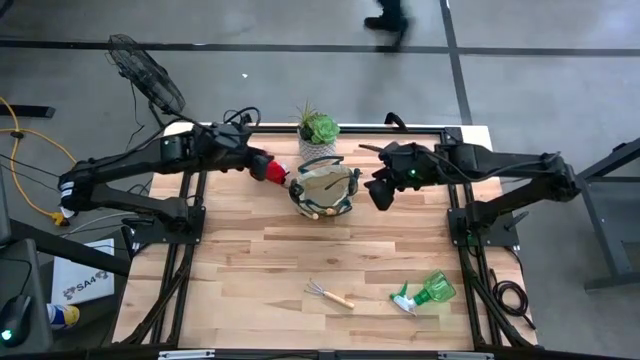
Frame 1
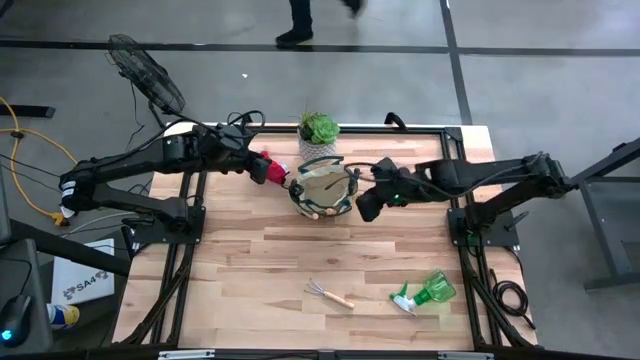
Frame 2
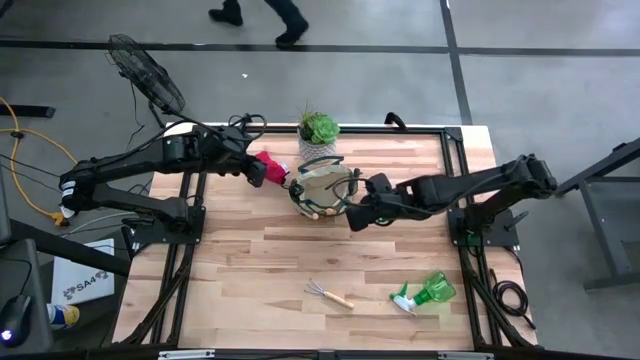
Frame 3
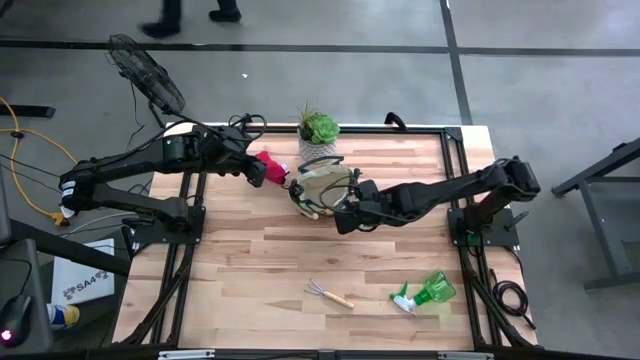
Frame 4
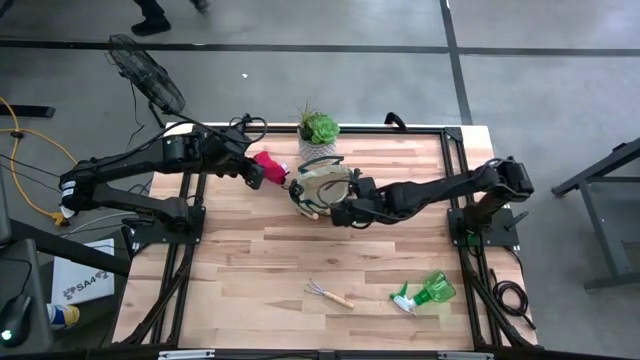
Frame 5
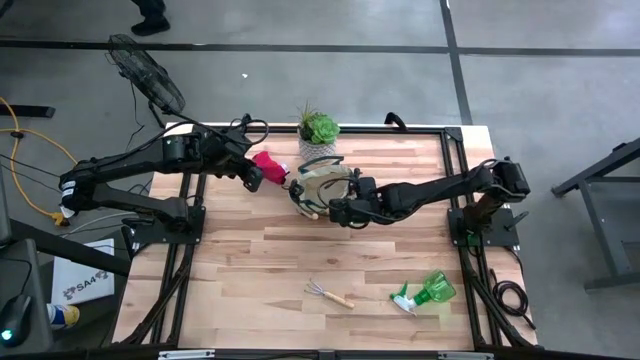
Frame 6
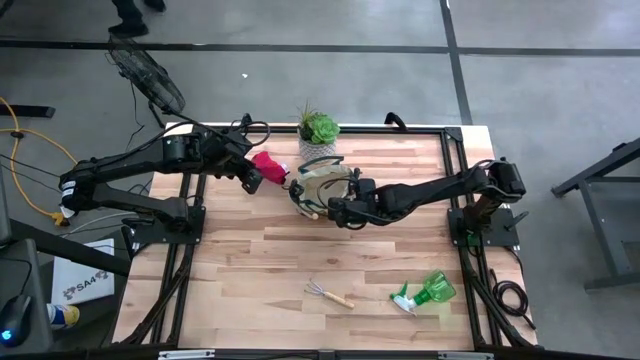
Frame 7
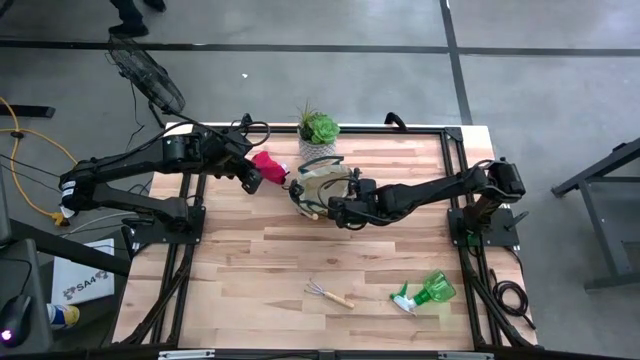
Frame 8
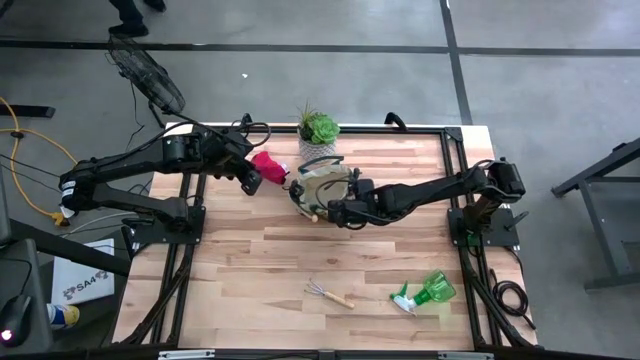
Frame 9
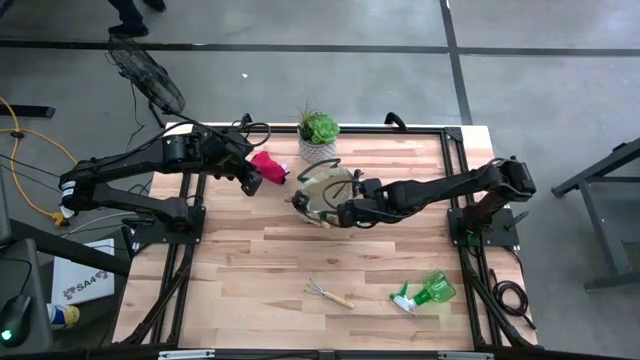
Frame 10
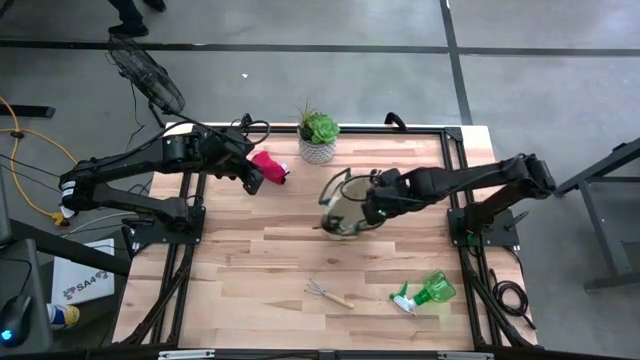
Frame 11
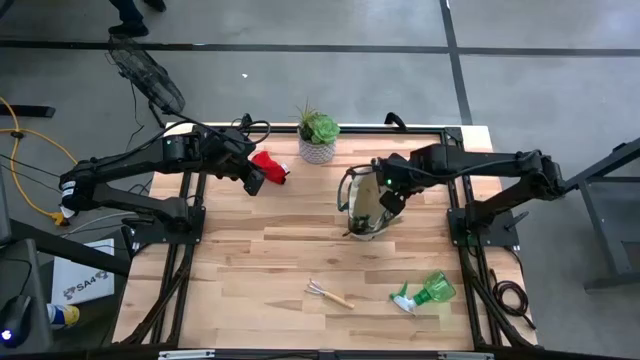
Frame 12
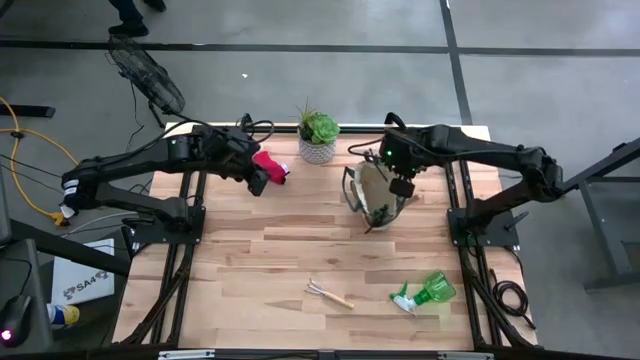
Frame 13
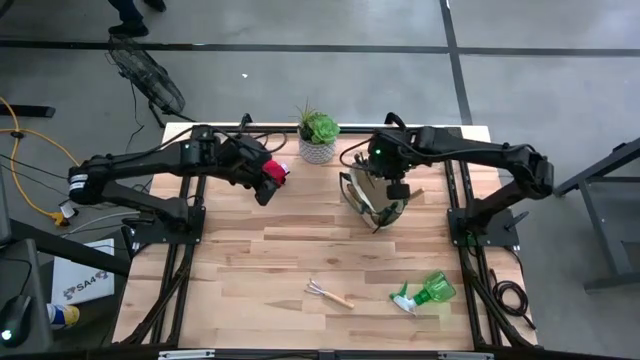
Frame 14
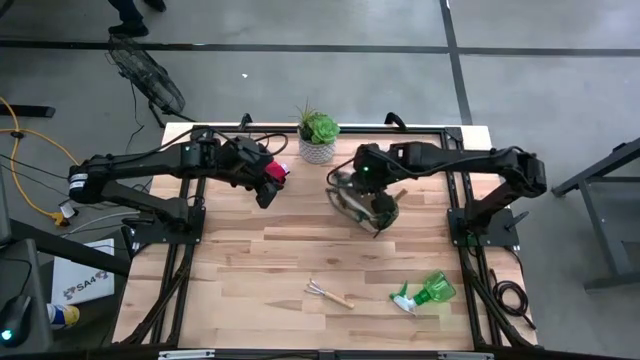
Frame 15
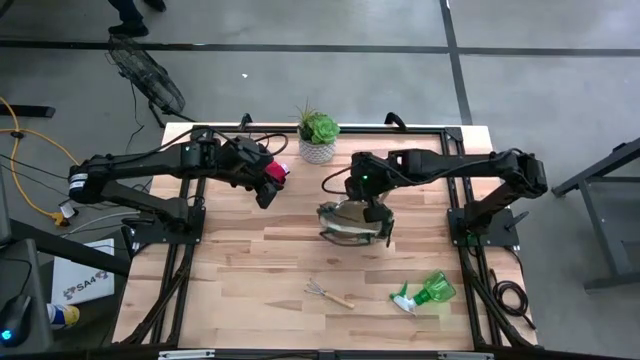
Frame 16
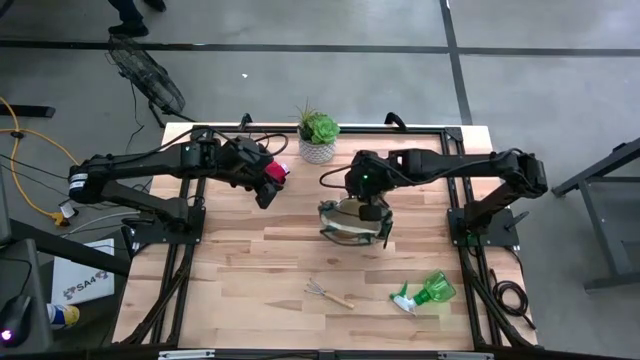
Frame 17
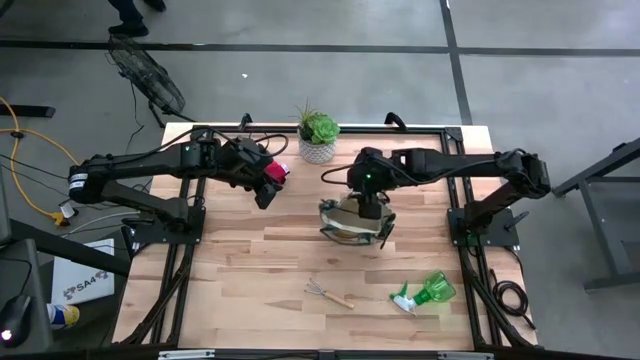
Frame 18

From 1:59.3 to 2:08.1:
Task: Pick & Place Garden tools in Gardening bag
Adjust the gardening bag

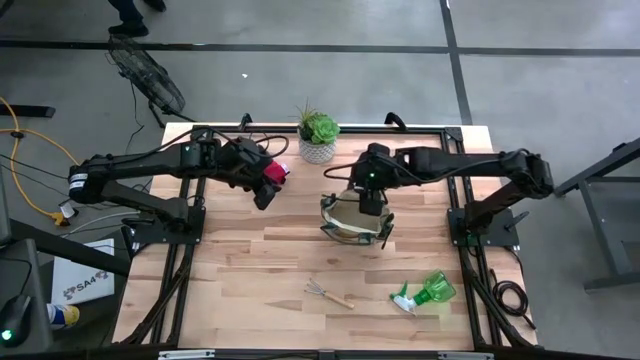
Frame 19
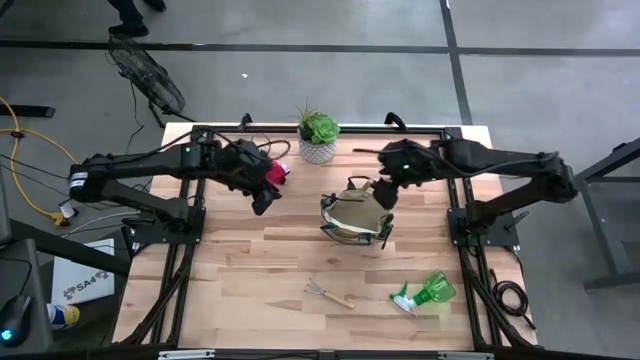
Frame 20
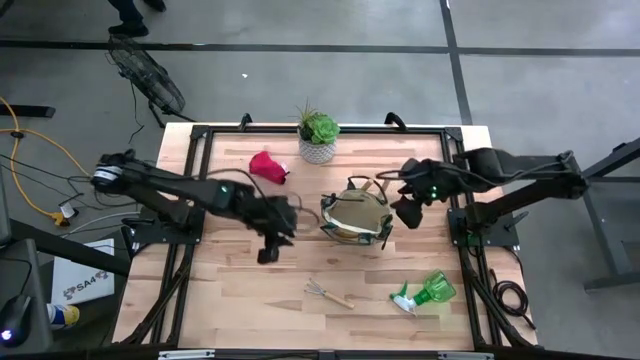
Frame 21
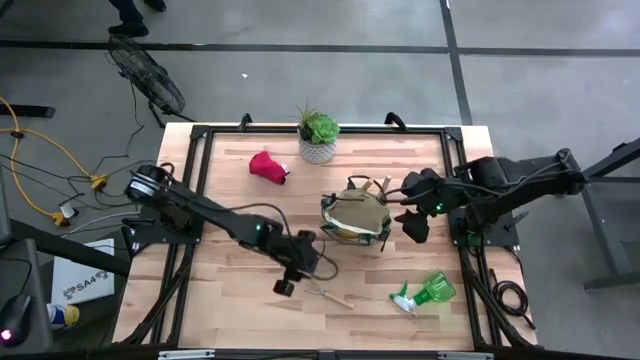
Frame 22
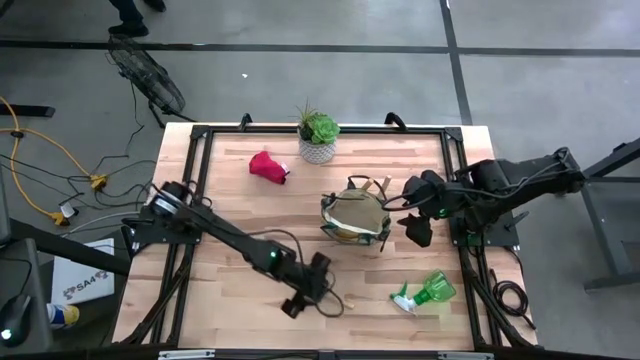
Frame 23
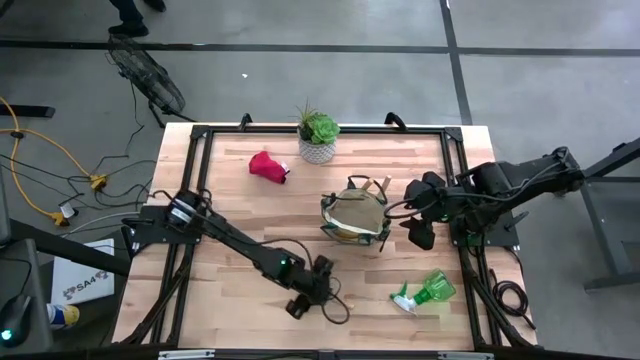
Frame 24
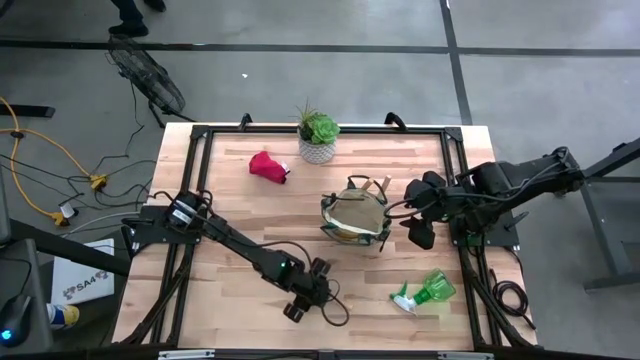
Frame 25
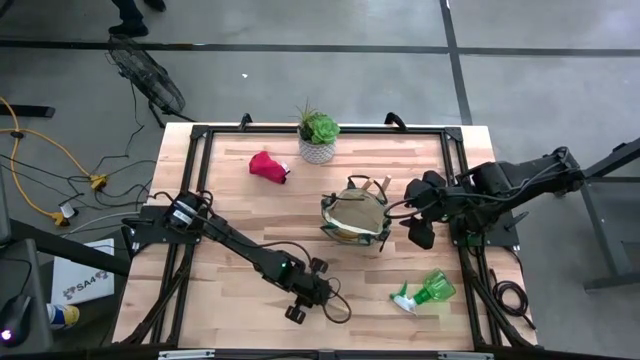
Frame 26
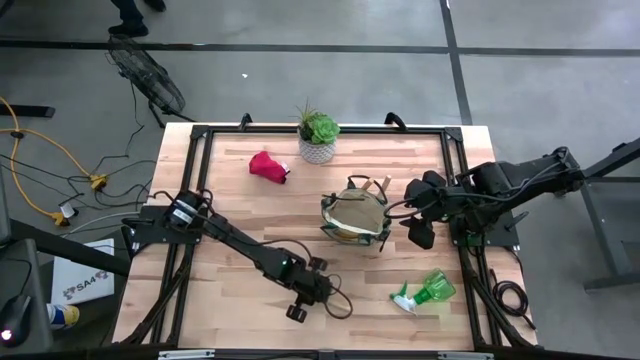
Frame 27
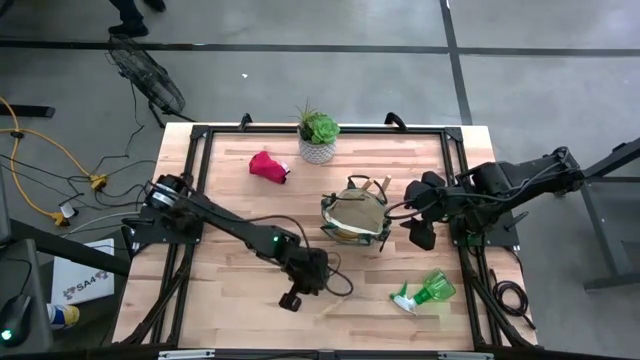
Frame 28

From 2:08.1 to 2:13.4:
Put the brown hand rake into the gardening bag

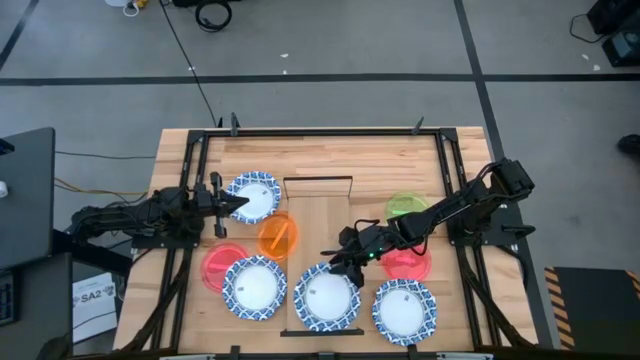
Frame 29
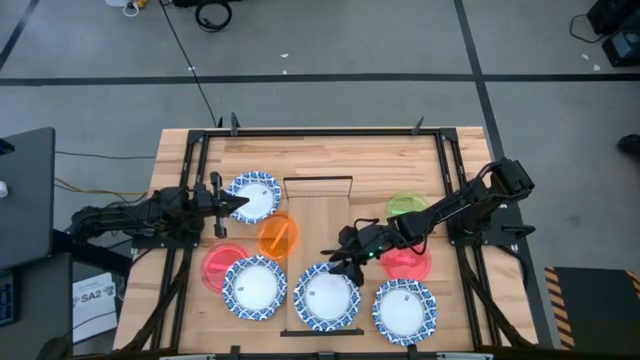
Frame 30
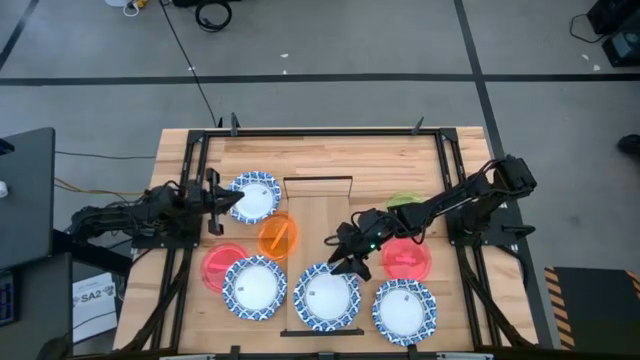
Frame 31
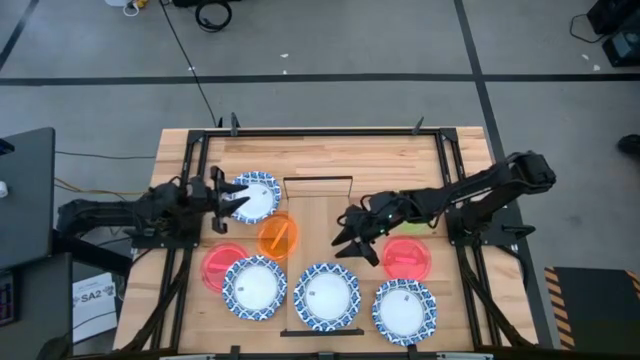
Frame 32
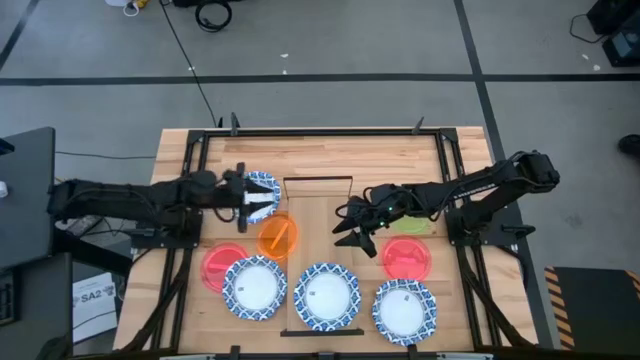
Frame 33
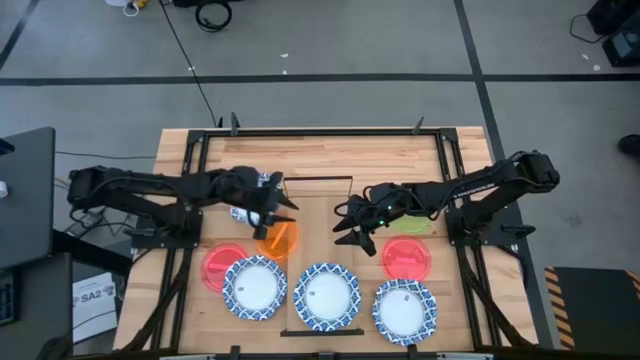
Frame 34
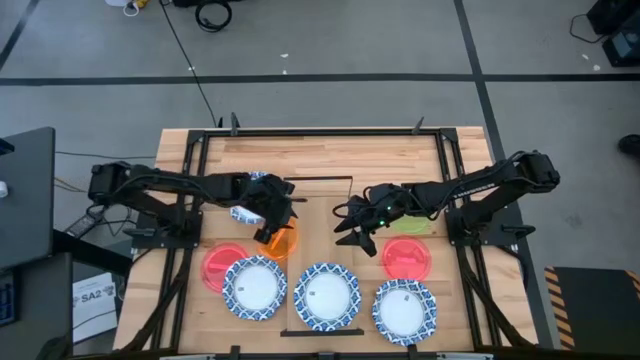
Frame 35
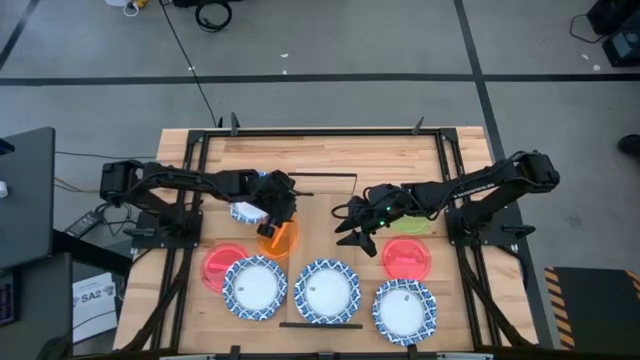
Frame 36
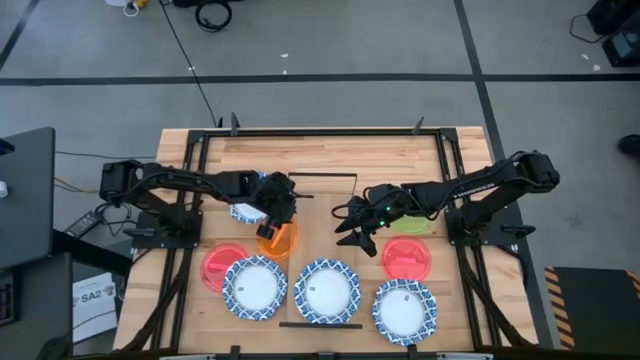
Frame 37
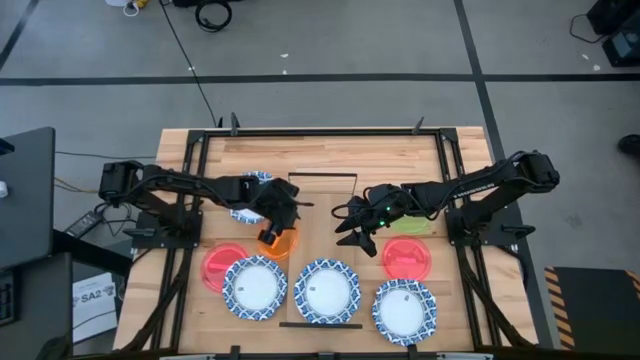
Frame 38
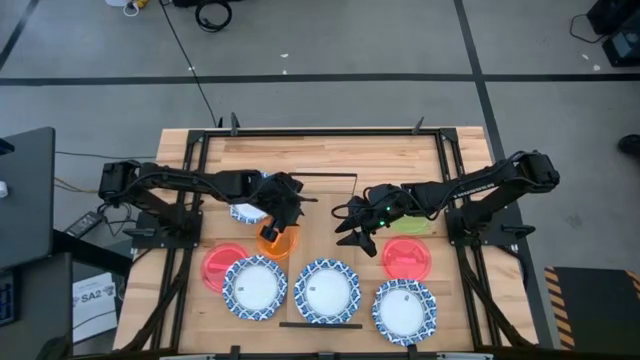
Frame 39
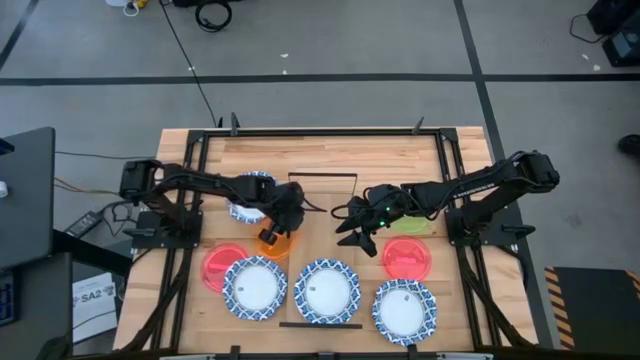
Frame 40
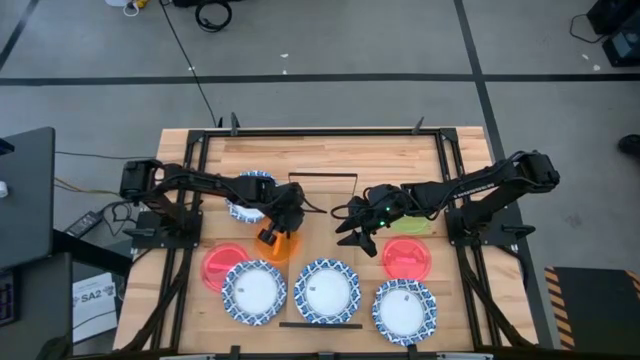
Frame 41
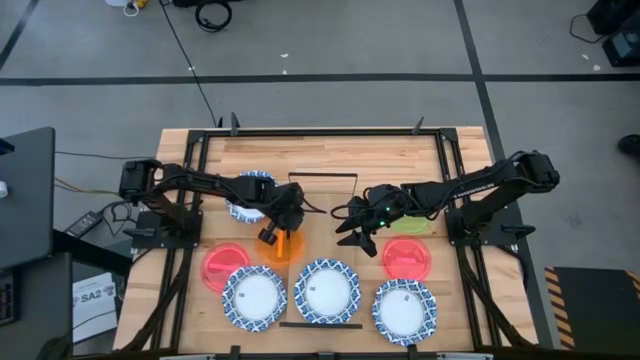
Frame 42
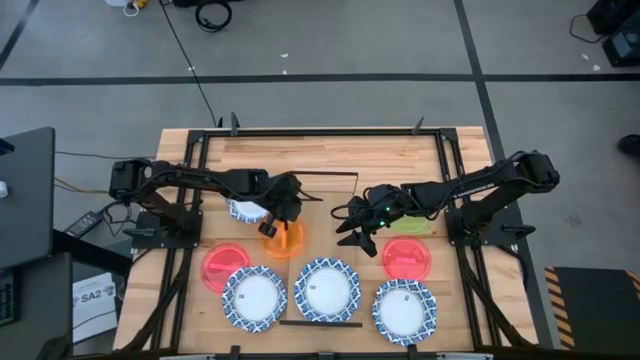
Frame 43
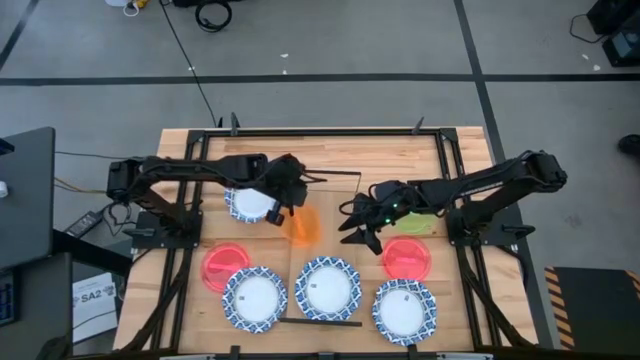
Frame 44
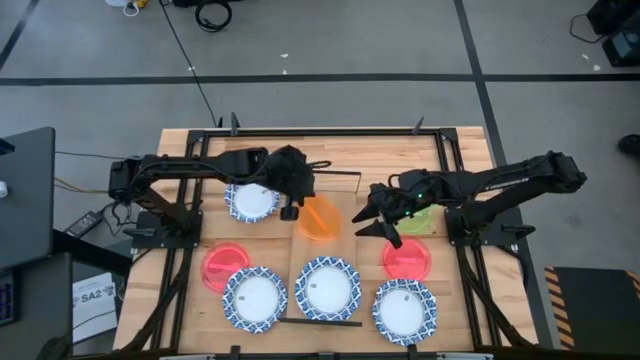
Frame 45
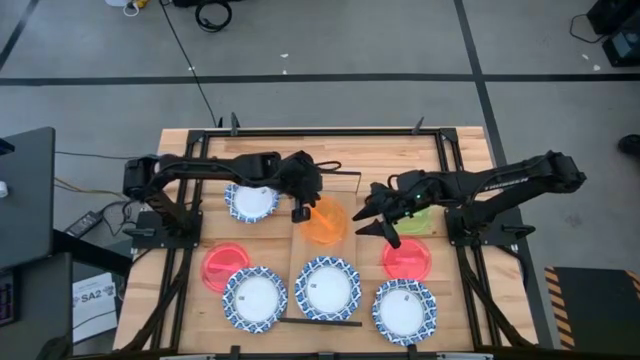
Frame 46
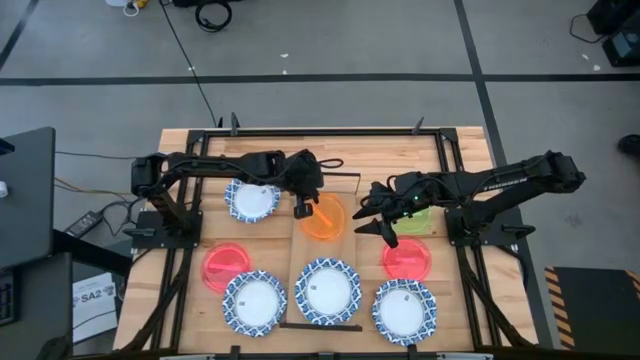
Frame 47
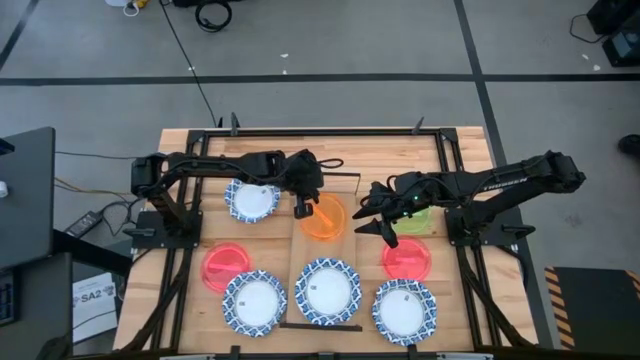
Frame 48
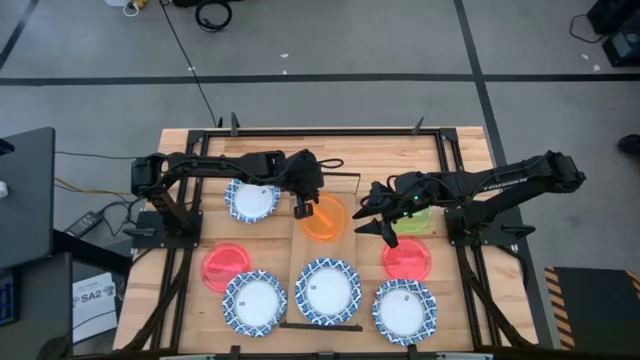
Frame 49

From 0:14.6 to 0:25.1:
Task: Place and stack plates onto a shelf
Put the orange transparent plate on the shelf
